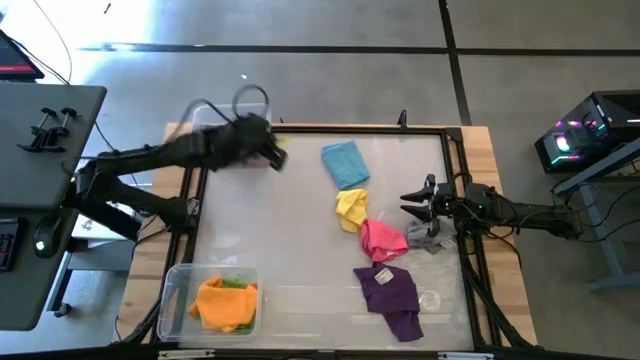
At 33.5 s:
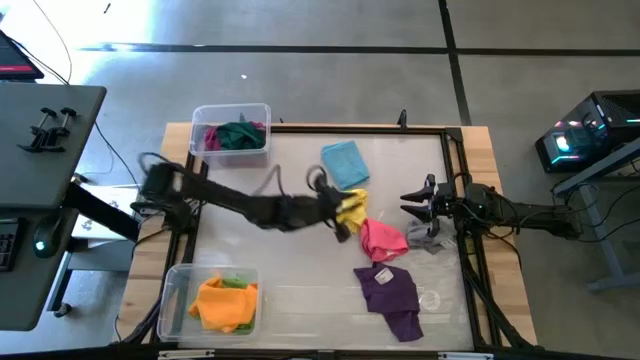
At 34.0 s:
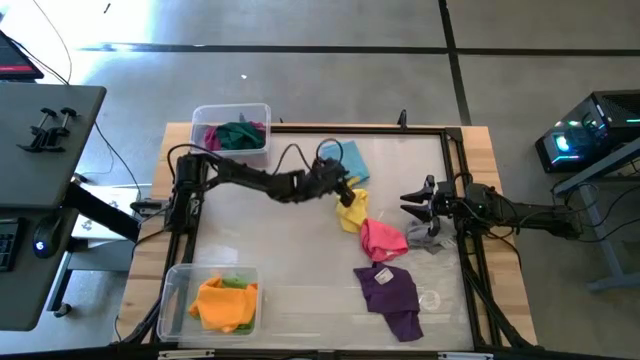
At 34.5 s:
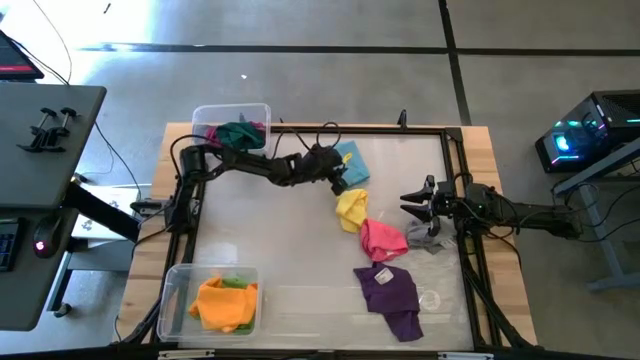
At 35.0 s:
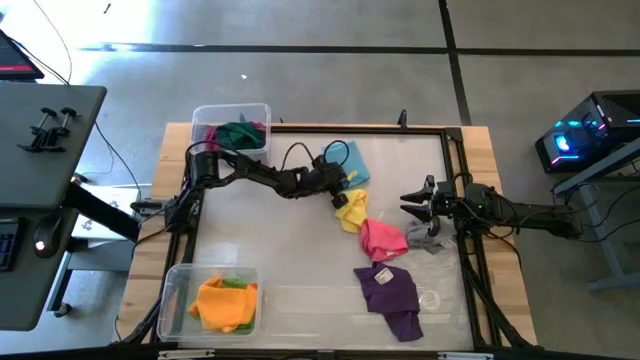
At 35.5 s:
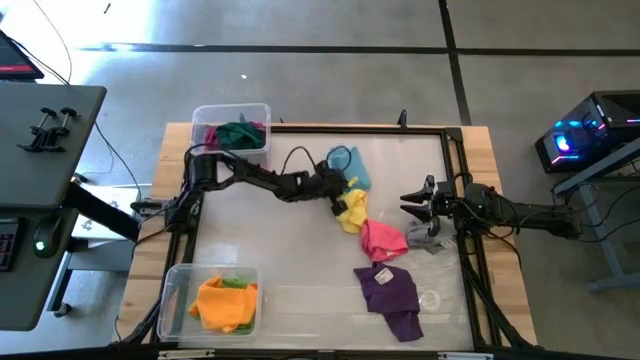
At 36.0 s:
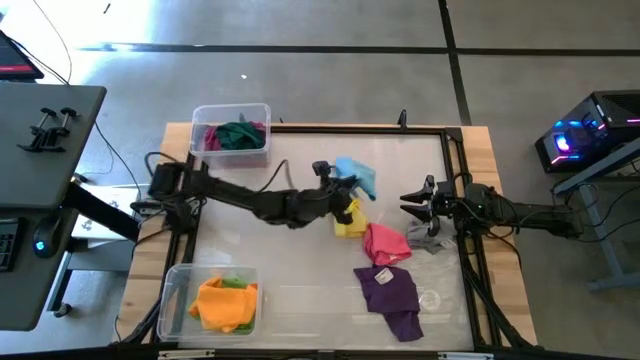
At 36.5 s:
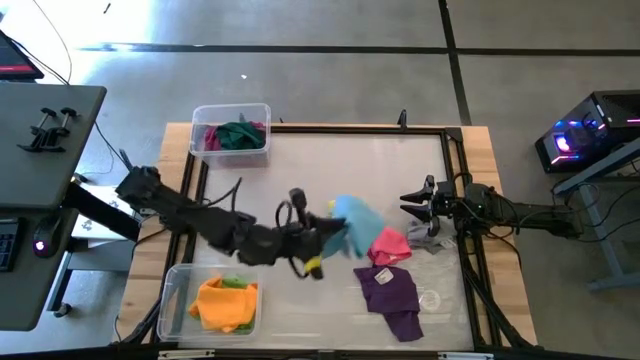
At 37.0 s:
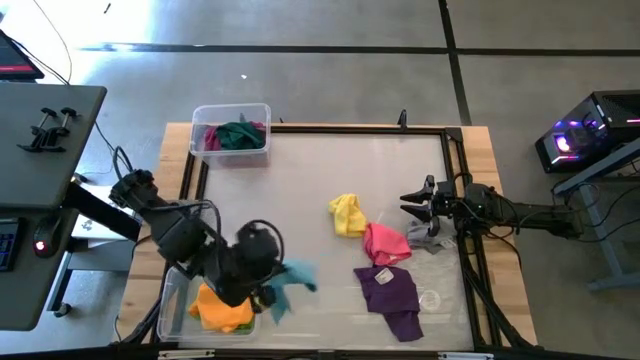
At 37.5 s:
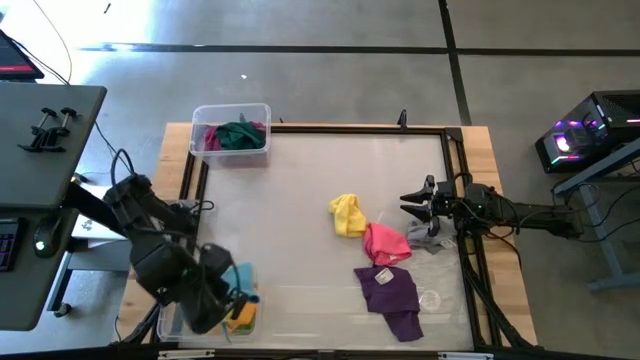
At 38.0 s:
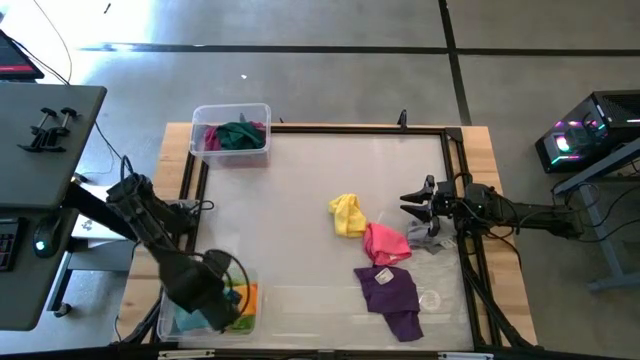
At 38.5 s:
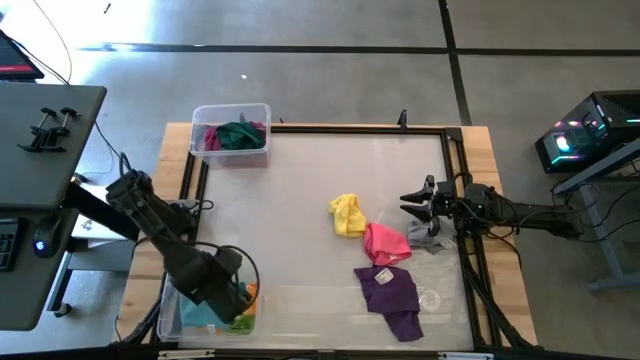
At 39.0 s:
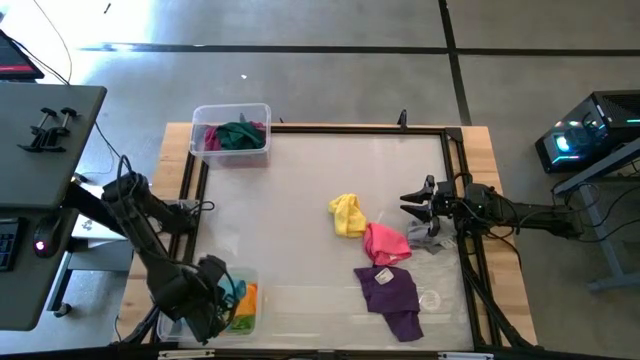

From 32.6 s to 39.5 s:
Task: Sort towels by color in basket
Put the blue towel into the bottom transparent bin

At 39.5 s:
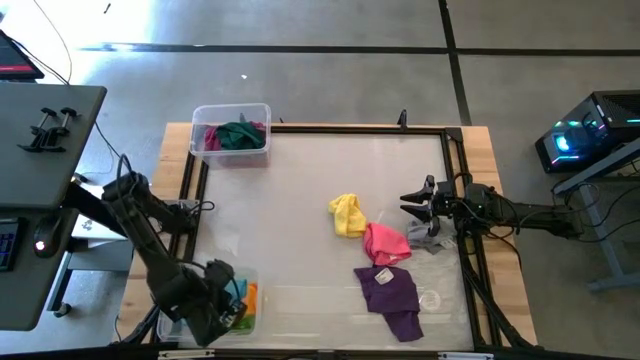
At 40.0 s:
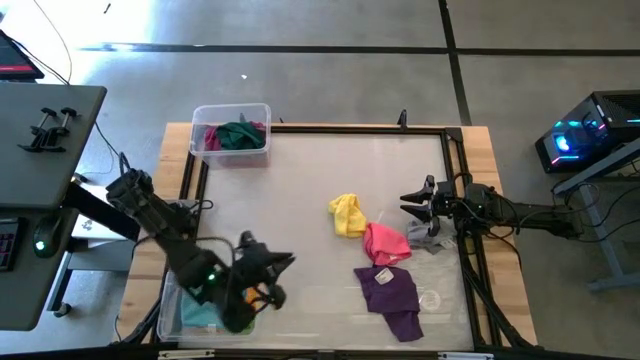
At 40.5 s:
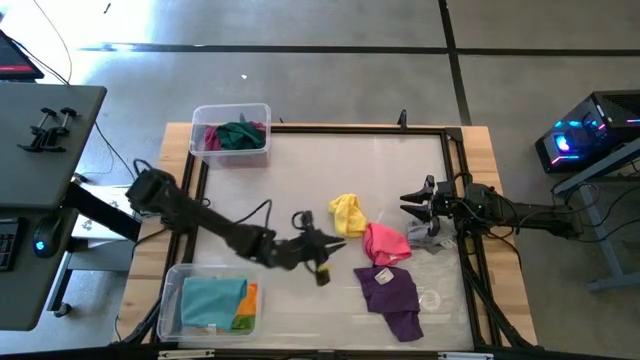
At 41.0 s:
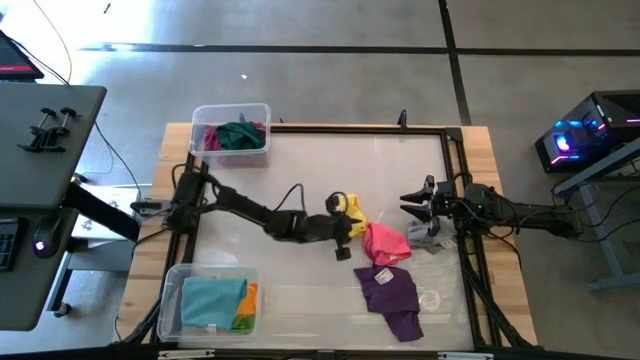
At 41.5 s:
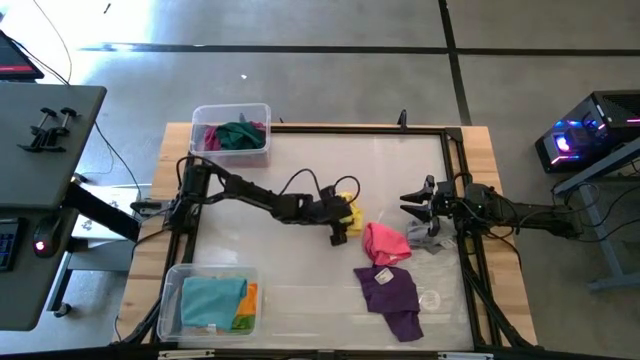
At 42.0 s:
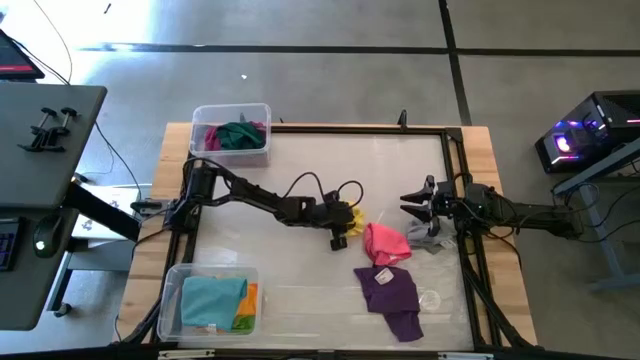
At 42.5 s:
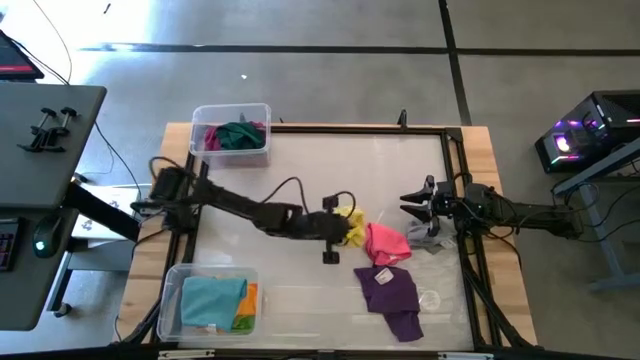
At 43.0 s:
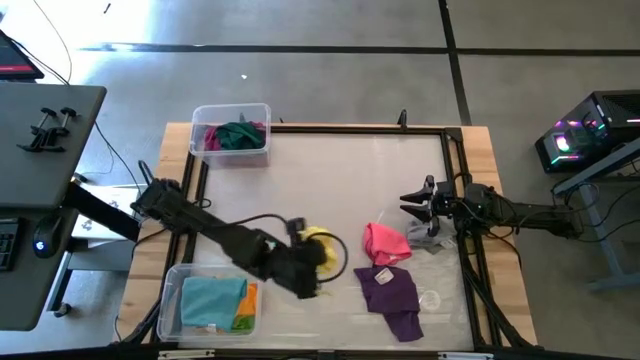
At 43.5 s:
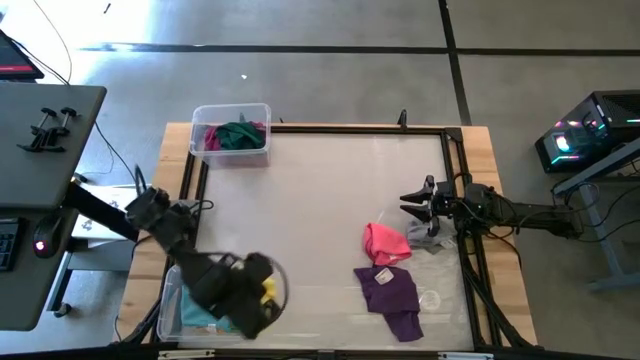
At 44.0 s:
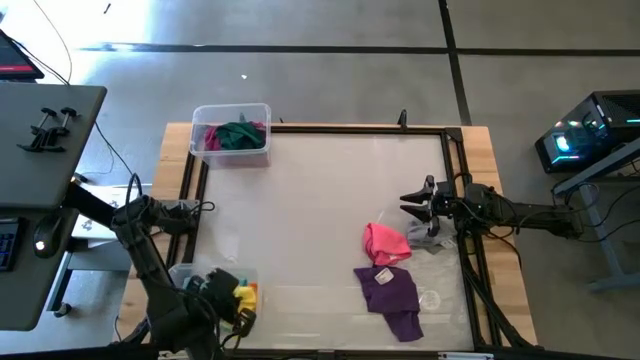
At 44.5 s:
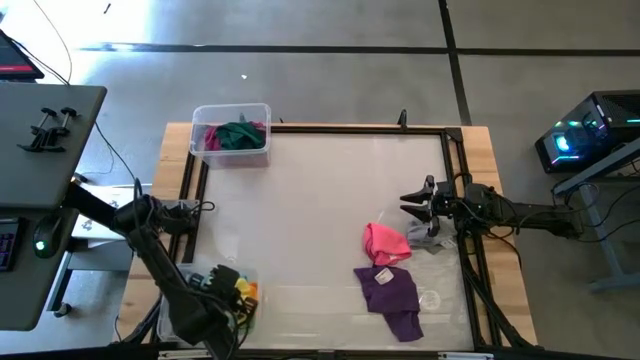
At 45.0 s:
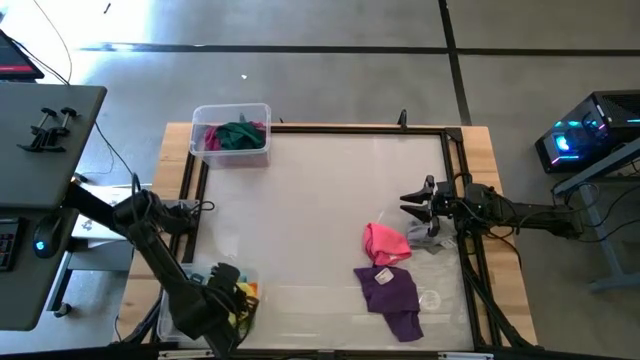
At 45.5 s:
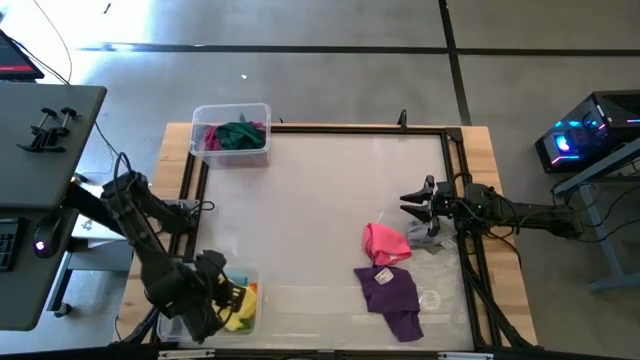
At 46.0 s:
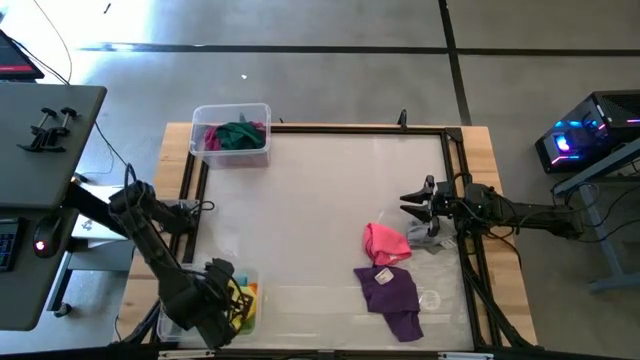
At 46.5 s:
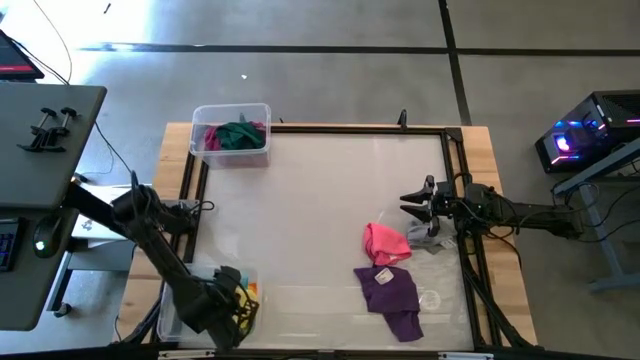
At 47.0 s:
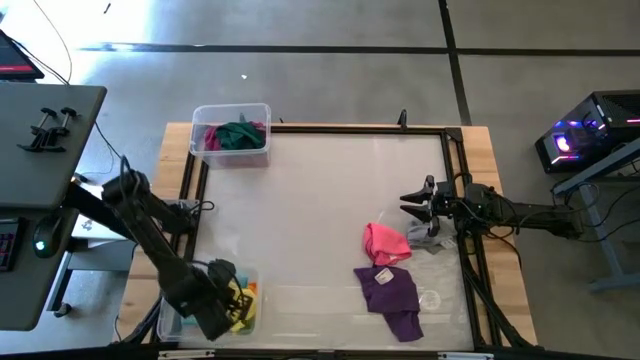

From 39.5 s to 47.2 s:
Put the yellow towel into the bottom transparent bin

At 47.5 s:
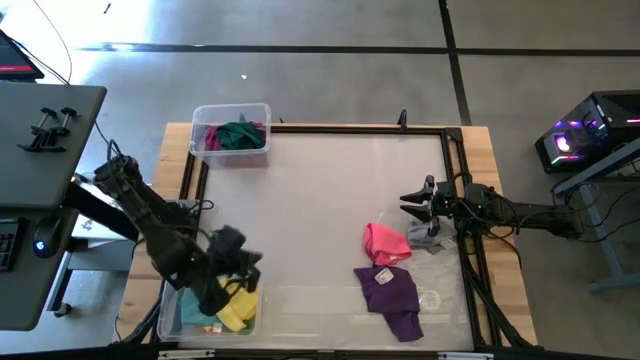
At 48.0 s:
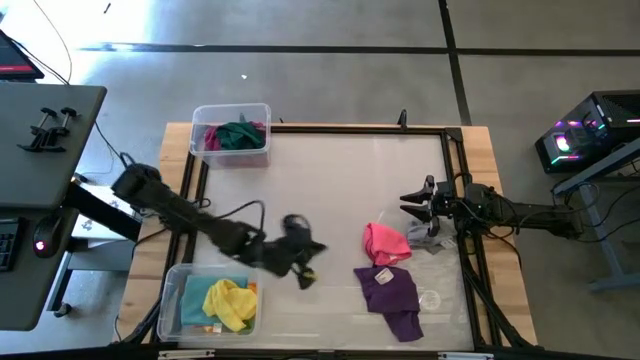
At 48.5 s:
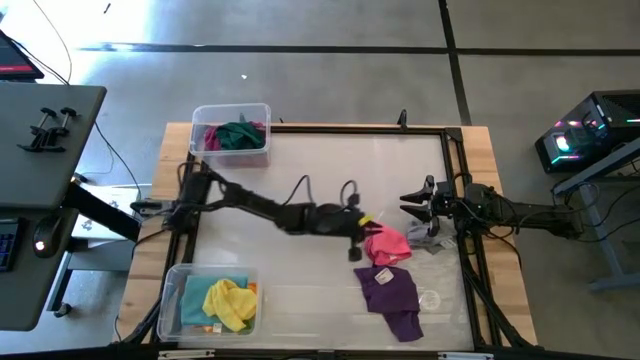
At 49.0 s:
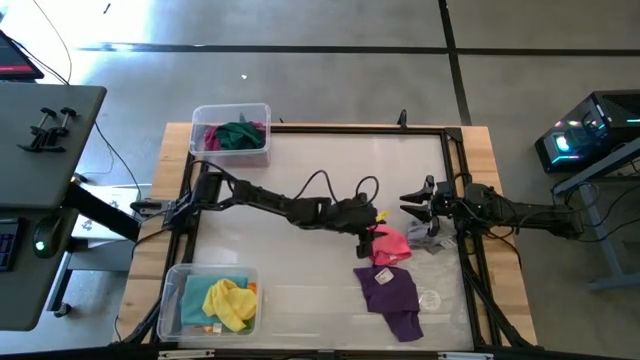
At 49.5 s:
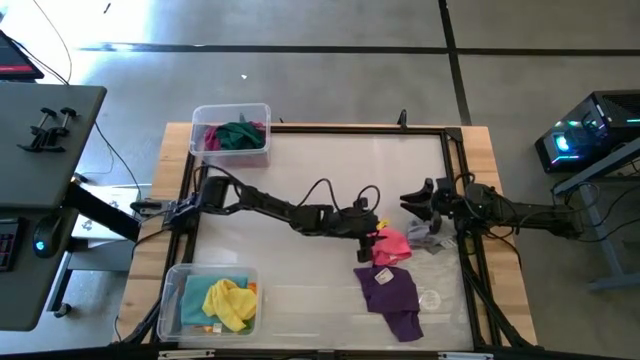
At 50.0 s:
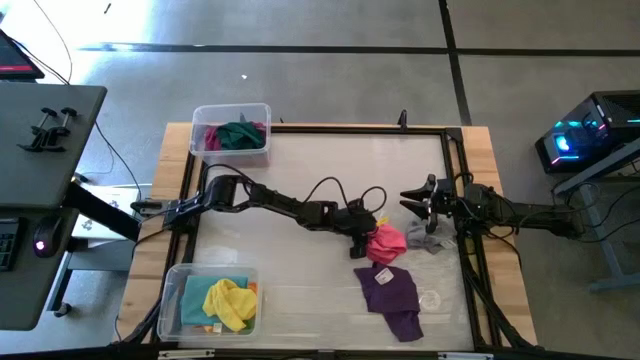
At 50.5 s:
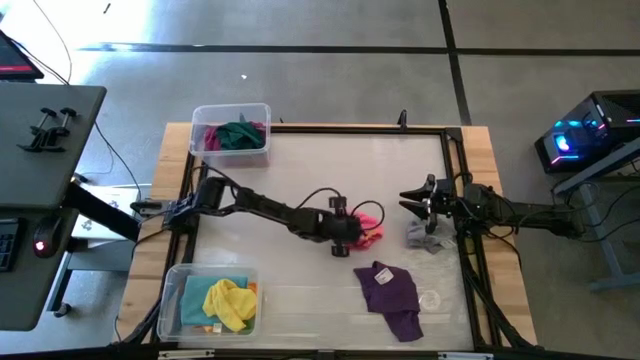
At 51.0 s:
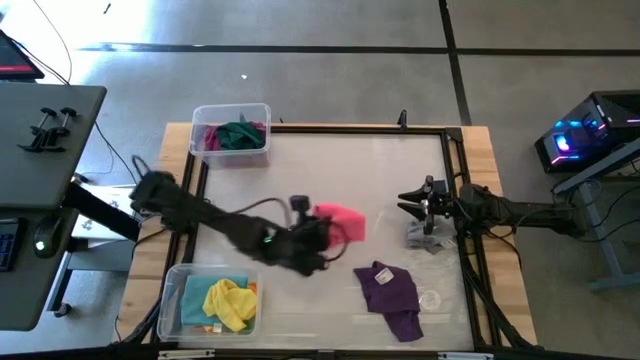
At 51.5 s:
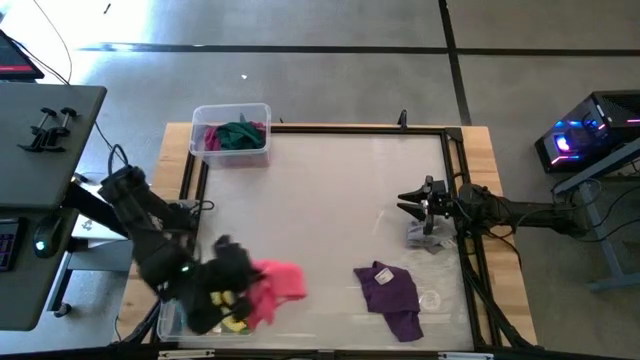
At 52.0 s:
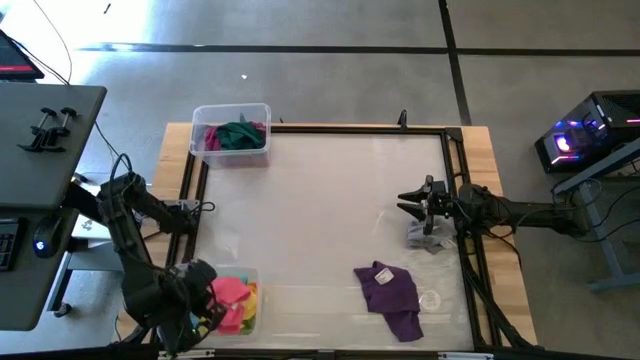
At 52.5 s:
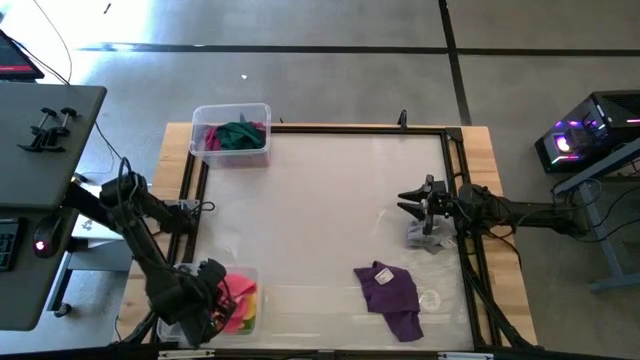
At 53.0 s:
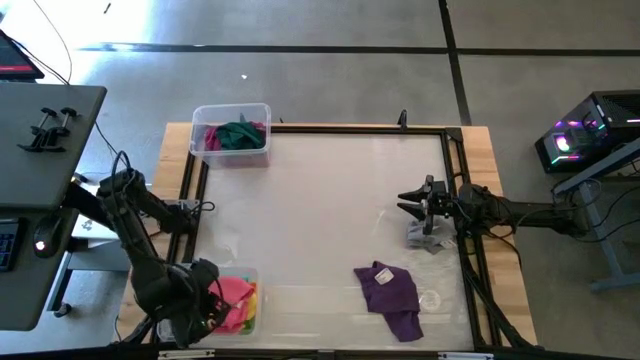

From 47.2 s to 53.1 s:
Put the pink towel into the bottom transparent bin
